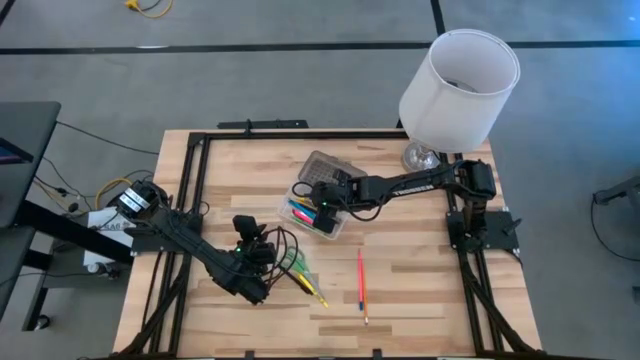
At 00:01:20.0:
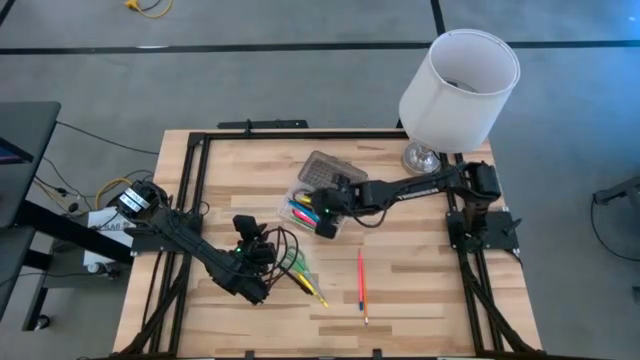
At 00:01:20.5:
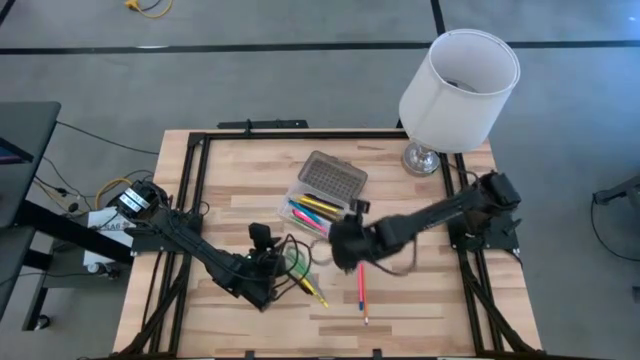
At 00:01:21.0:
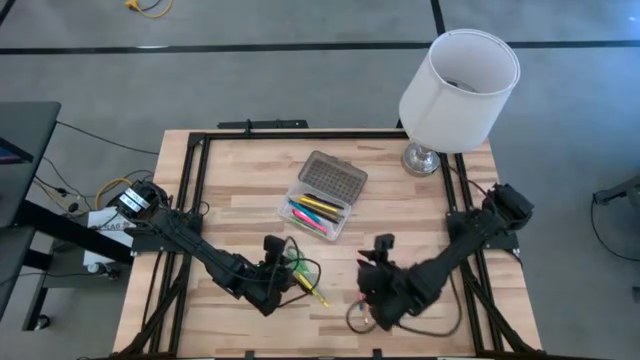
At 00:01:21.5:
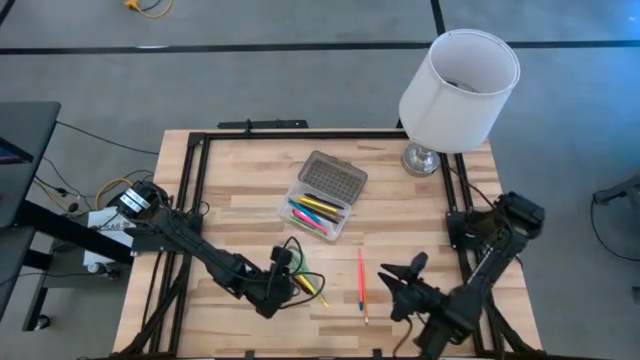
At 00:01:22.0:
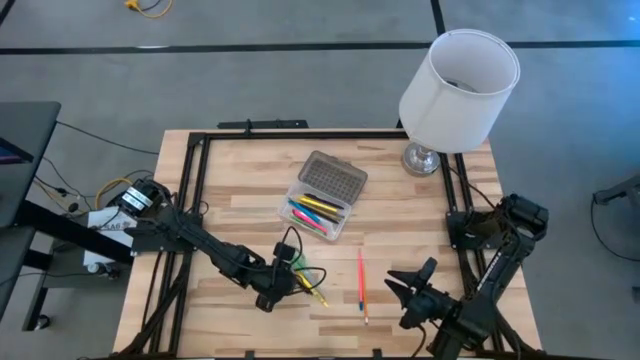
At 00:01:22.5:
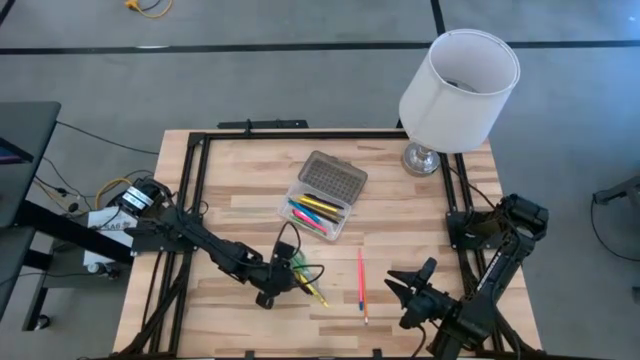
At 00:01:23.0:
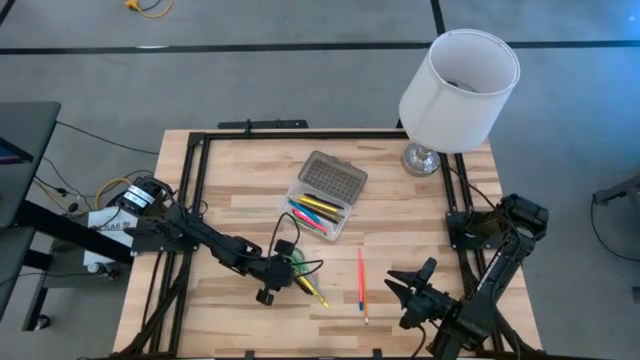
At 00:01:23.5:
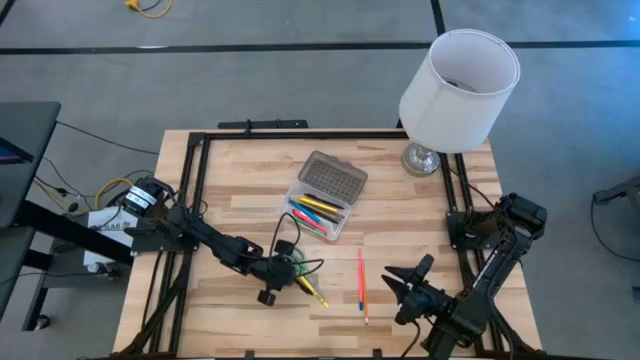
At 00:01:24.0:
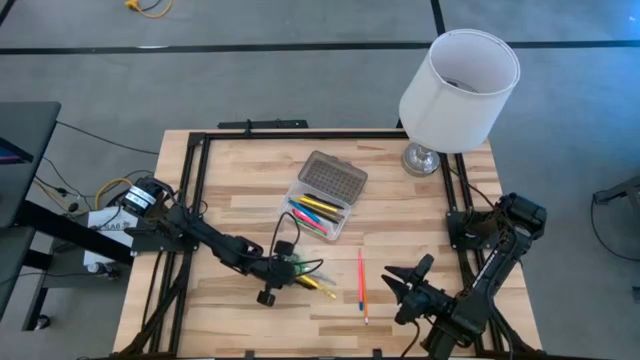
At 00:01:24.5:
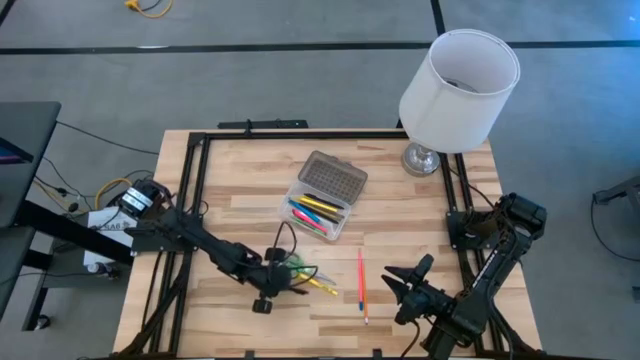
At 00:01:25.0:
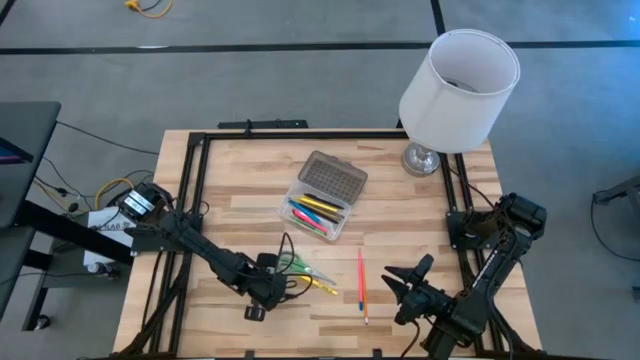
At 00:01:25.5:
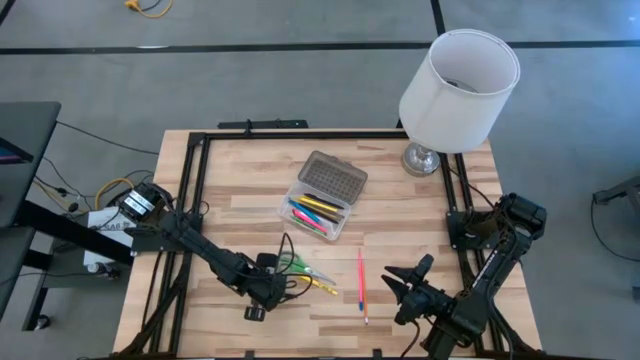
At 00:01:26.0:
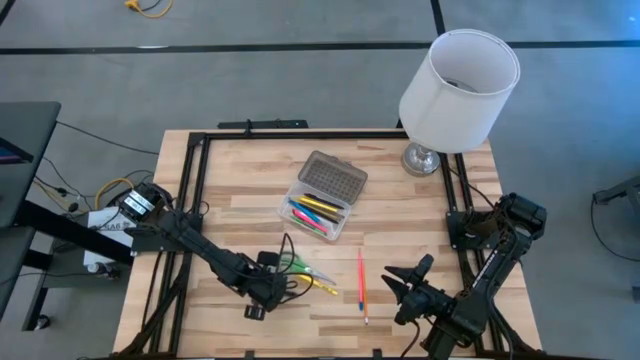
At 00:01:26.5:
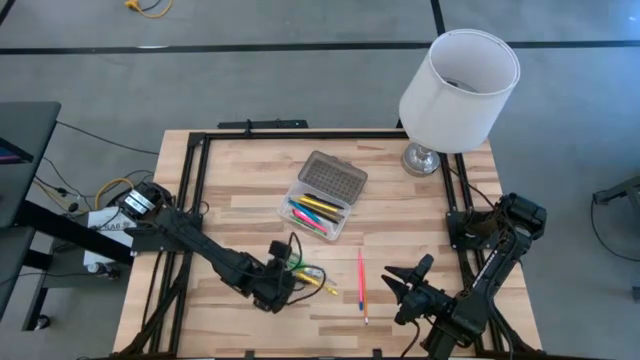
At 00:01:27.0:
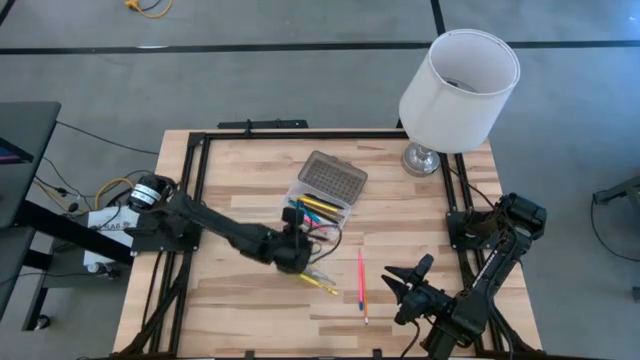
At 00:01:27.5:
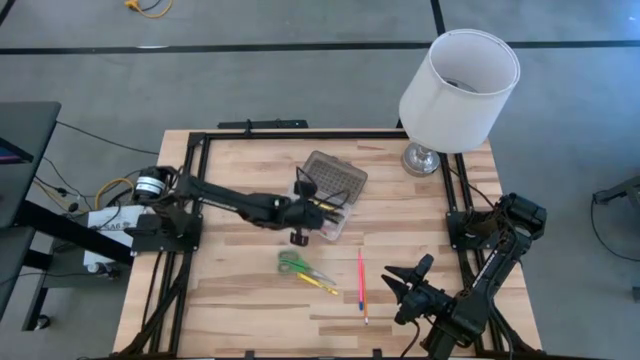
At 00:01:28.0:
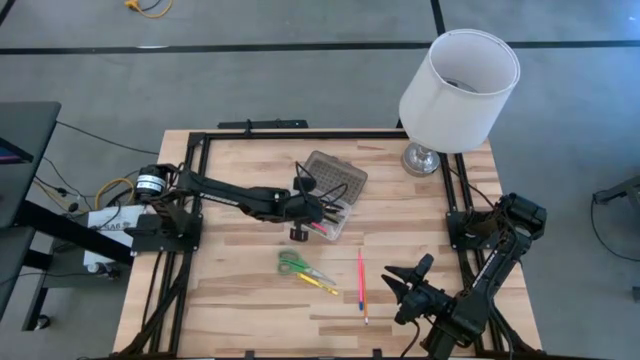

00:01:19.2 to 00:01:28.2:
Task: Pick & place school supplies into a supply box
Put the black pen into the gray supply box

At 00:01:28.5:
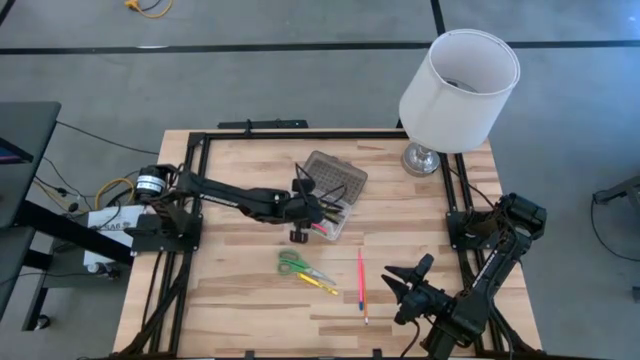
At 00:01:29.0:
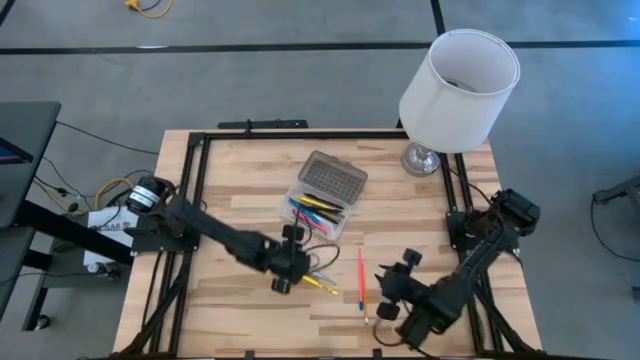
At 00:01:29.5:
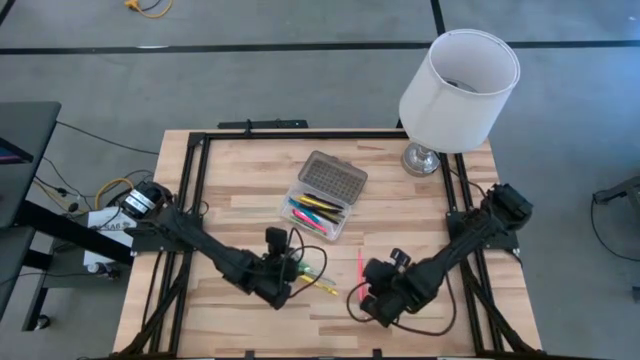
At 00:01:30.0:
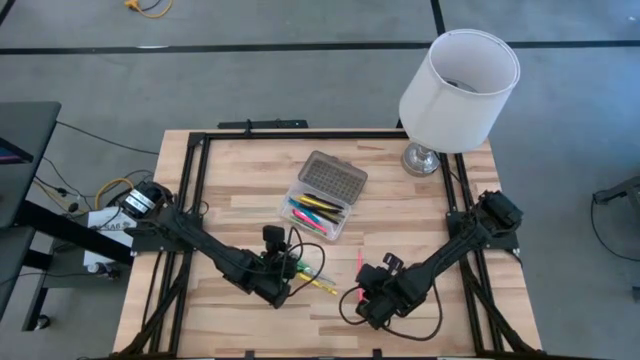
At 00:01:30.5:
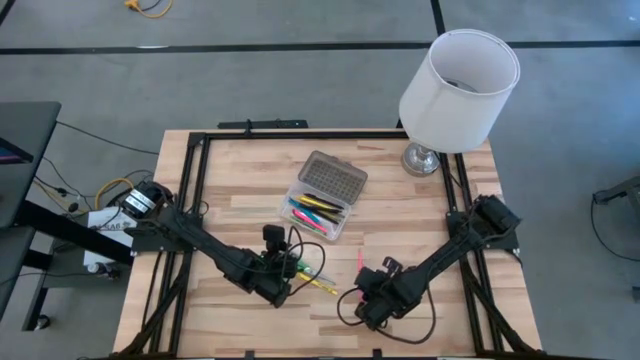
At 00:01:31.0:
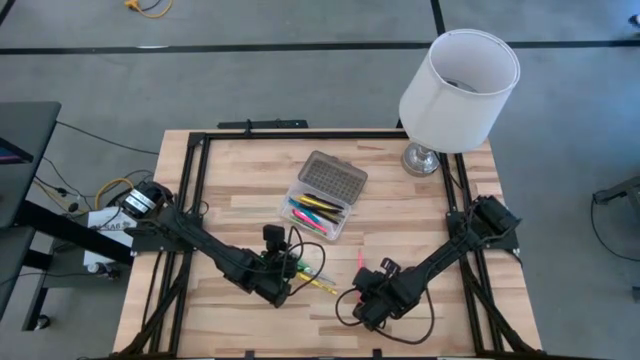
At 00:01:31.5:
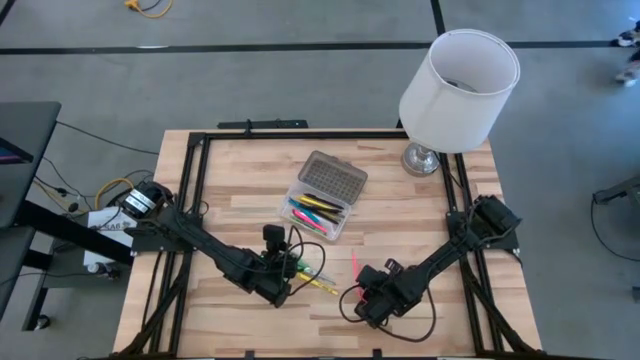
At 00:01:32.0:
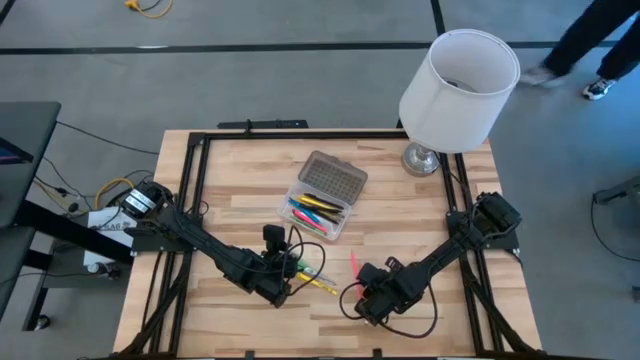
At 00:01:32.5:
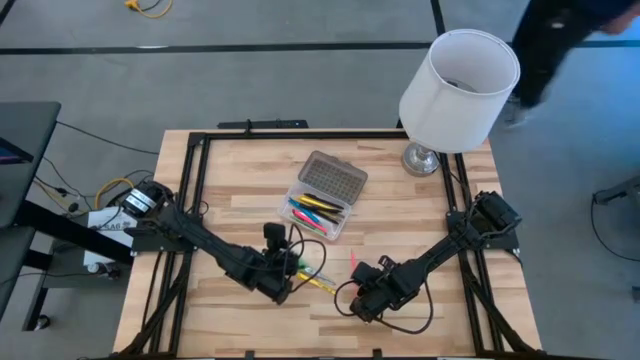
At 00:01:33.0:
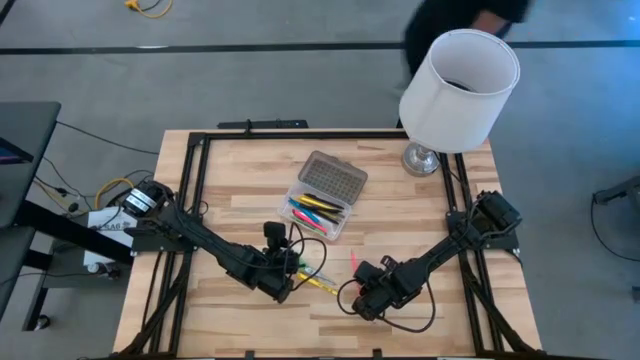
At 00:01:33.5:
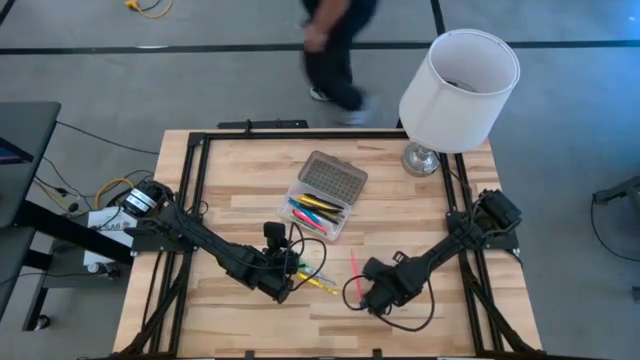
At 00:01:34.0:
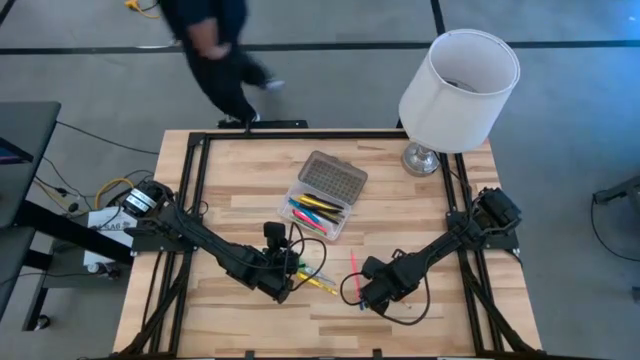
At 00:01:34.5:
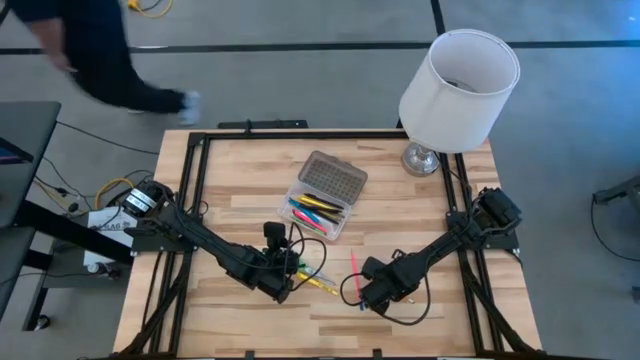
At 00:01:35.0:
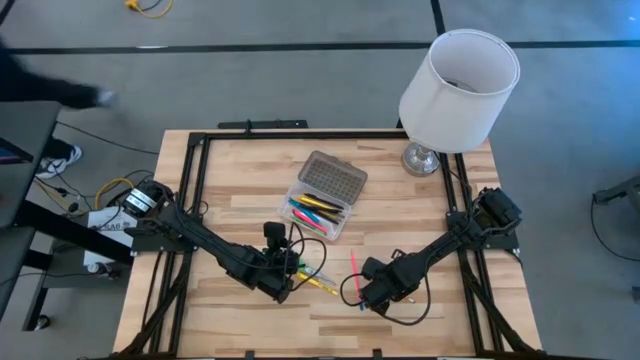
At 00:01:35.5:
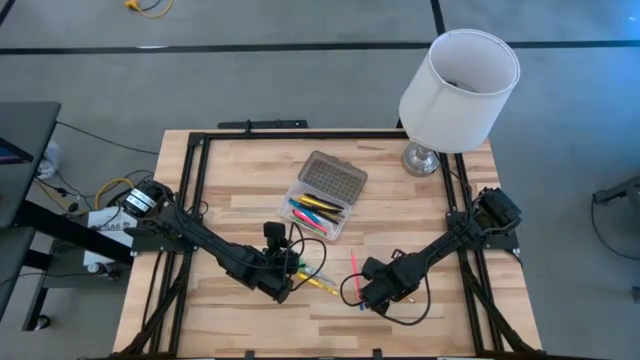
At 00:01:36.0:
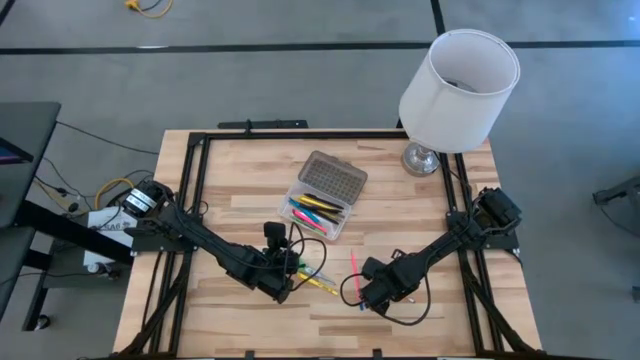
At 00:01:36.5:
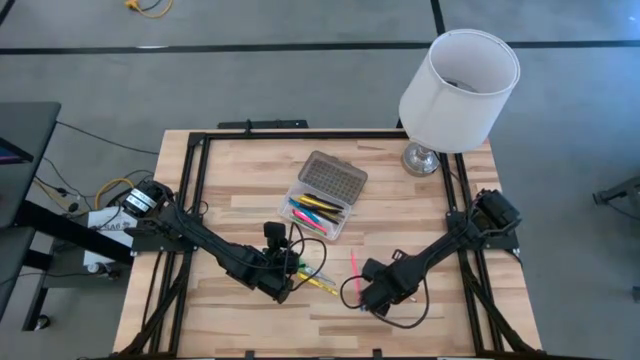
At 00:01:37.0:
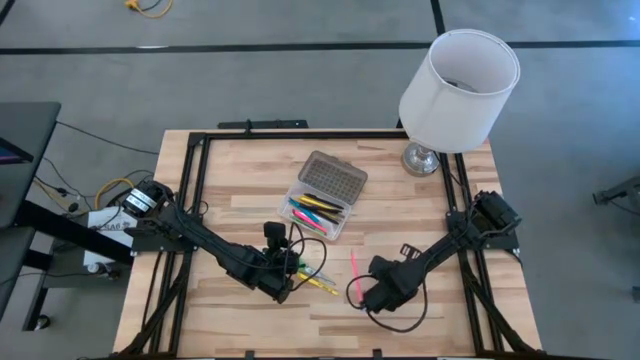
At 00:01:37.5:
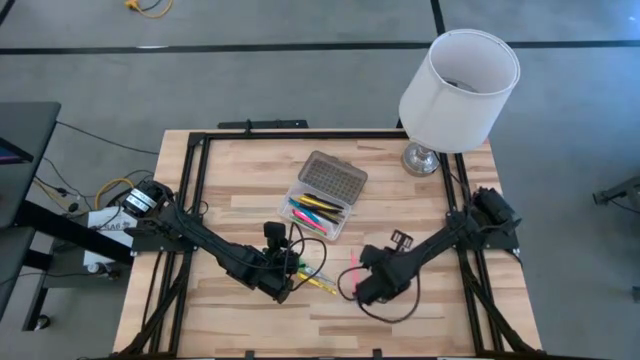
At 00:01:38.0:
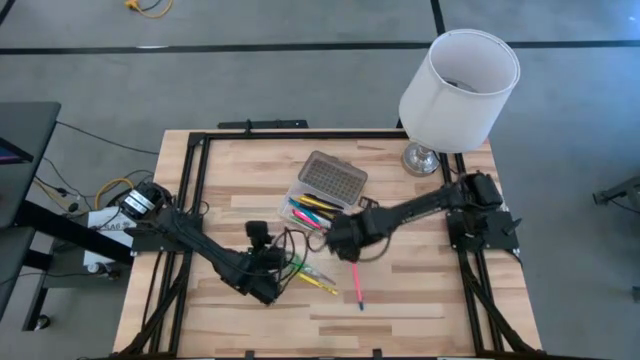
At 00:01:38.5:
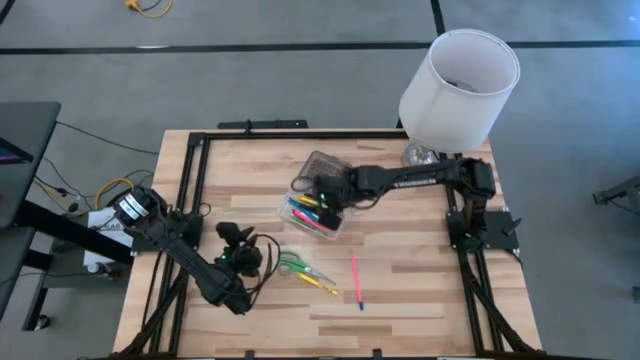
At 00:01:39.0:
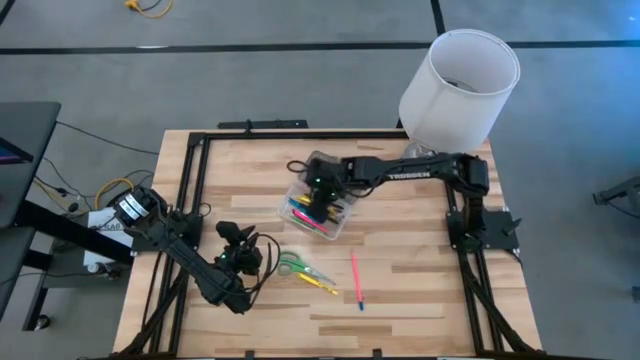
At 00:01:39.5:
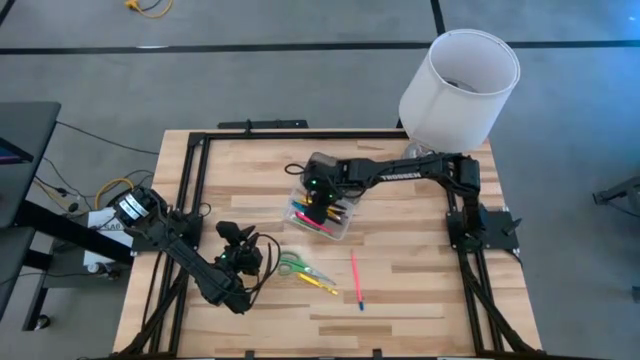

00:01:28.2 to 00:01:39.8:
Put the orange supply into the gray supply box
